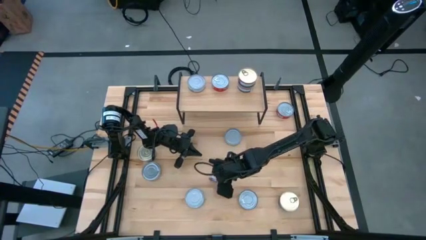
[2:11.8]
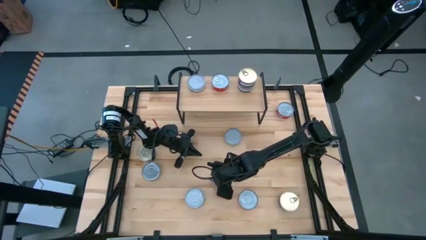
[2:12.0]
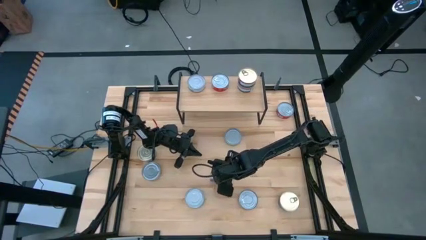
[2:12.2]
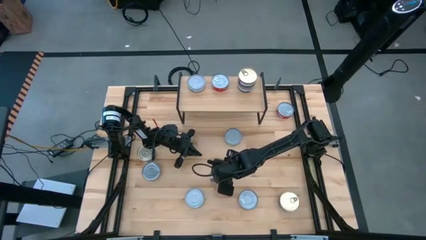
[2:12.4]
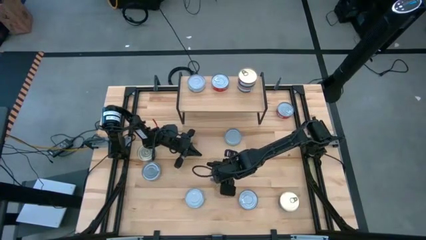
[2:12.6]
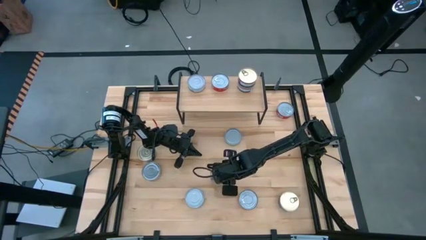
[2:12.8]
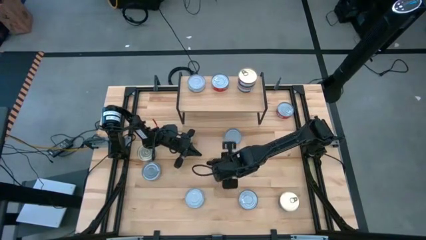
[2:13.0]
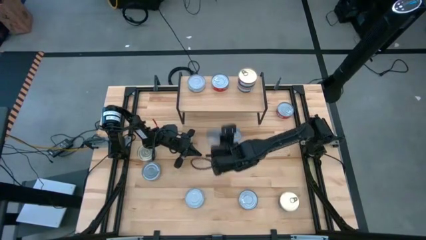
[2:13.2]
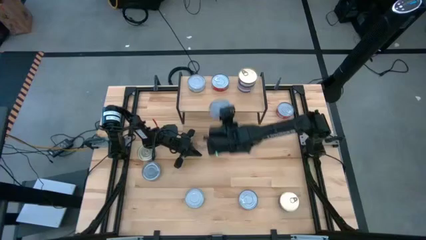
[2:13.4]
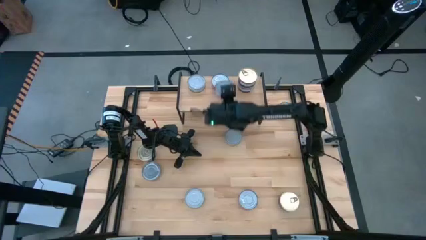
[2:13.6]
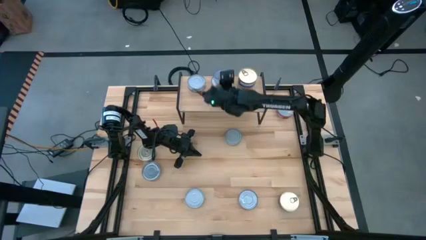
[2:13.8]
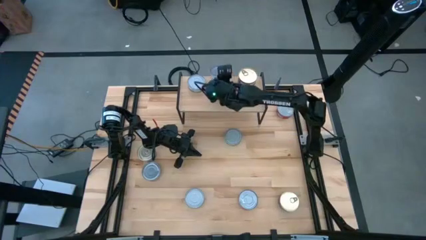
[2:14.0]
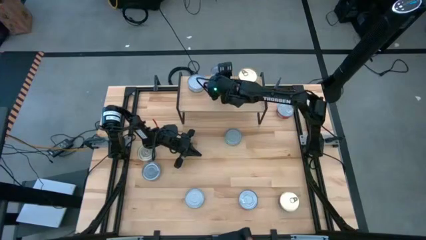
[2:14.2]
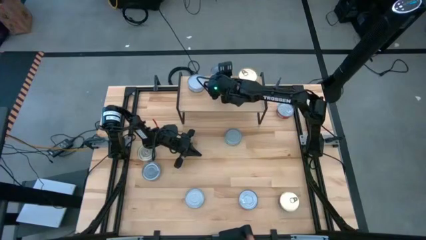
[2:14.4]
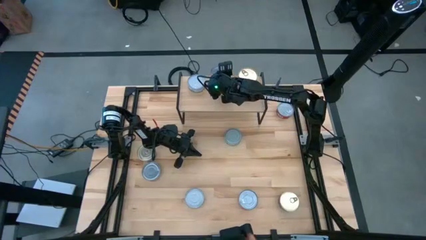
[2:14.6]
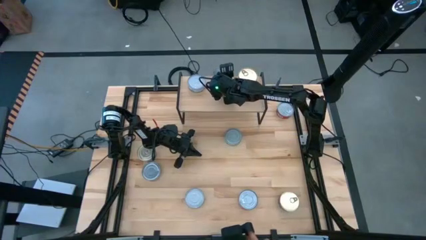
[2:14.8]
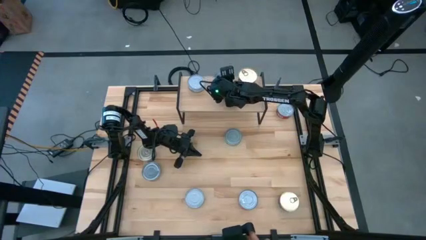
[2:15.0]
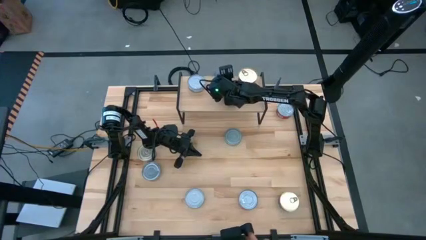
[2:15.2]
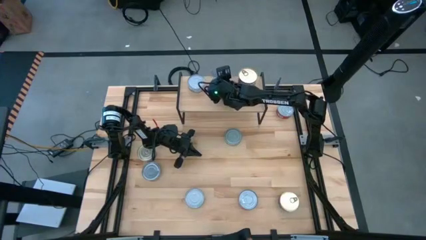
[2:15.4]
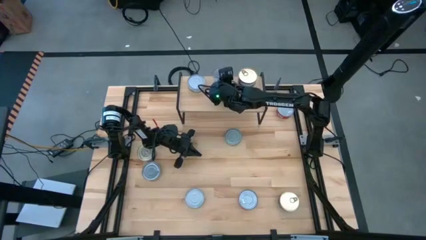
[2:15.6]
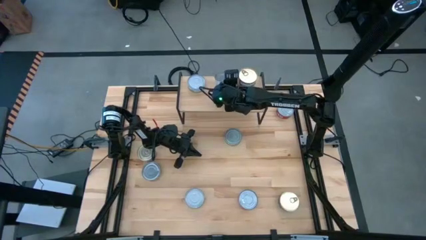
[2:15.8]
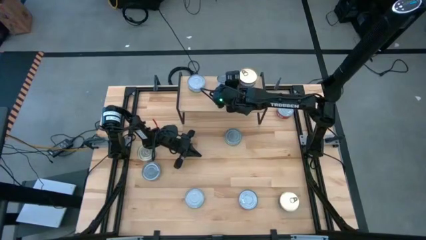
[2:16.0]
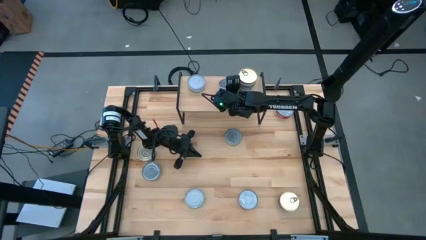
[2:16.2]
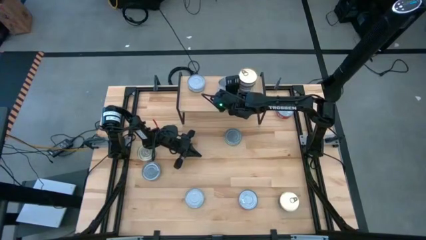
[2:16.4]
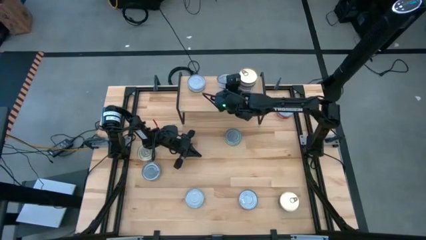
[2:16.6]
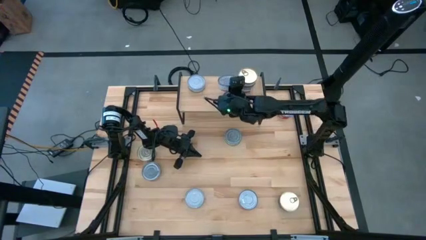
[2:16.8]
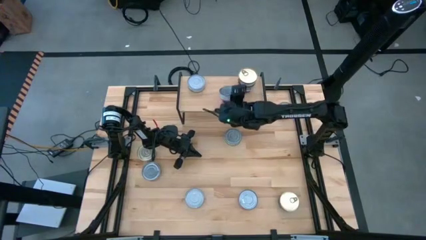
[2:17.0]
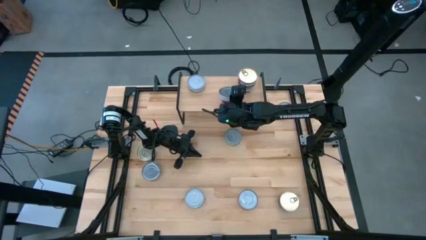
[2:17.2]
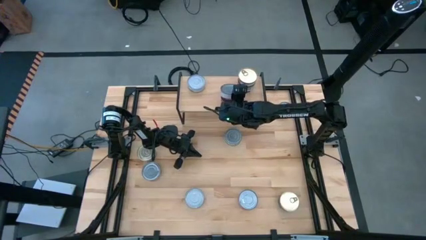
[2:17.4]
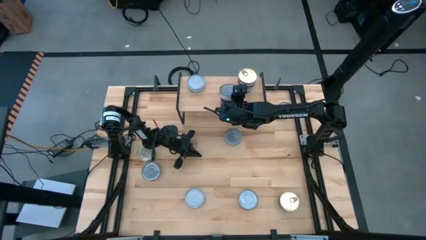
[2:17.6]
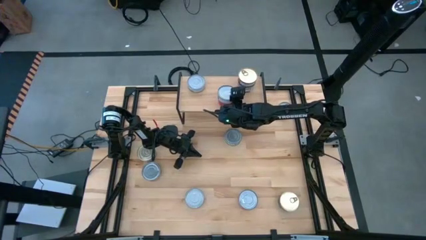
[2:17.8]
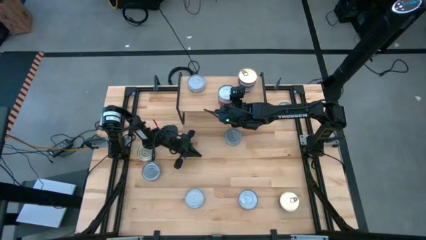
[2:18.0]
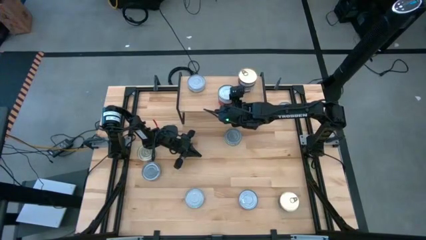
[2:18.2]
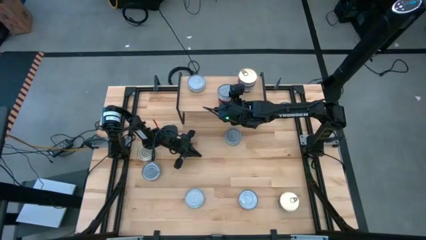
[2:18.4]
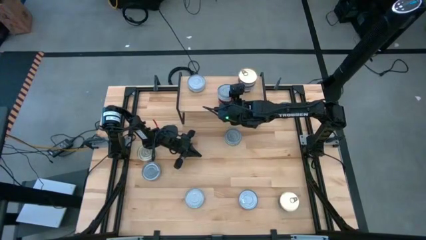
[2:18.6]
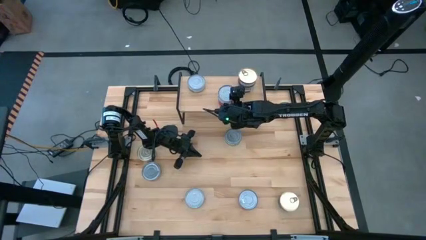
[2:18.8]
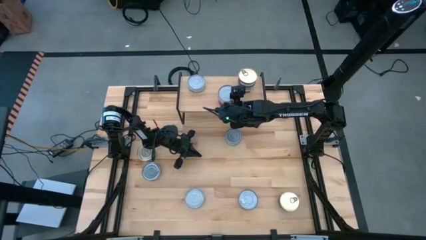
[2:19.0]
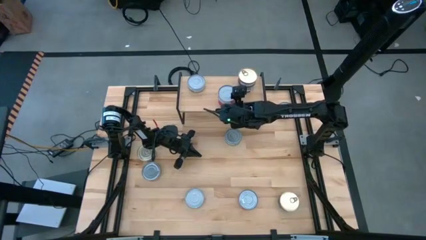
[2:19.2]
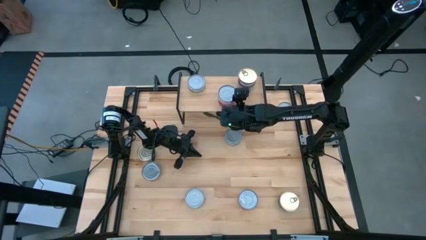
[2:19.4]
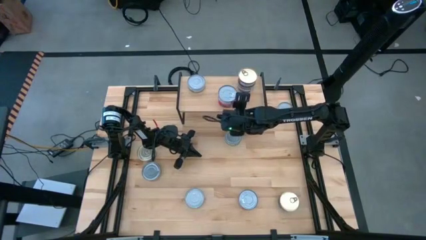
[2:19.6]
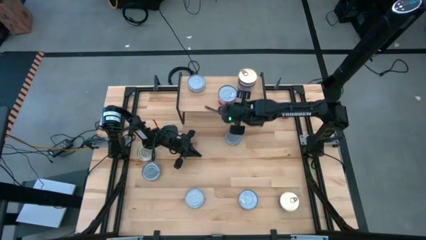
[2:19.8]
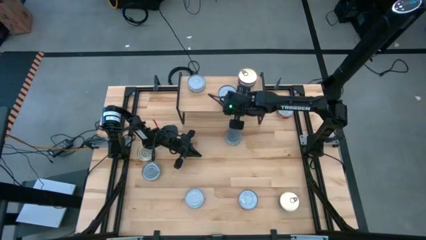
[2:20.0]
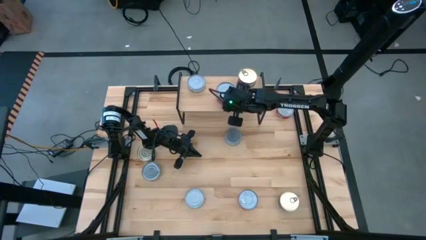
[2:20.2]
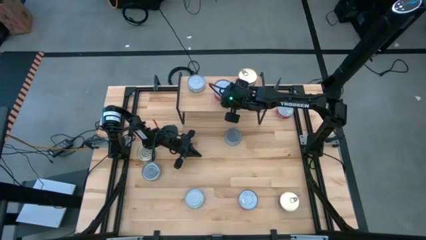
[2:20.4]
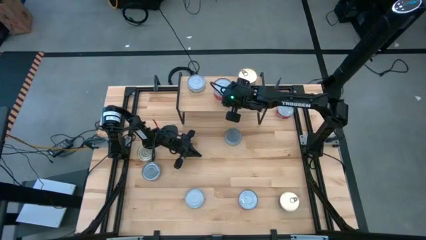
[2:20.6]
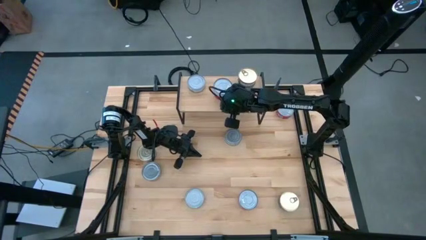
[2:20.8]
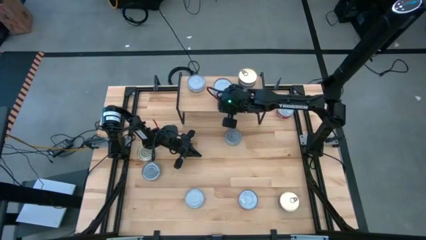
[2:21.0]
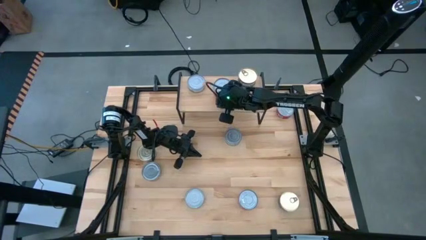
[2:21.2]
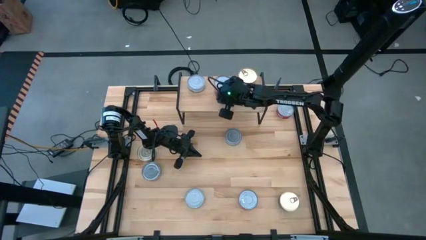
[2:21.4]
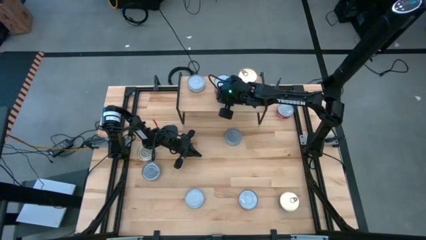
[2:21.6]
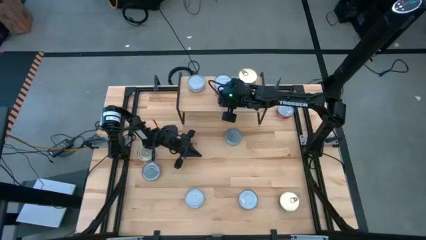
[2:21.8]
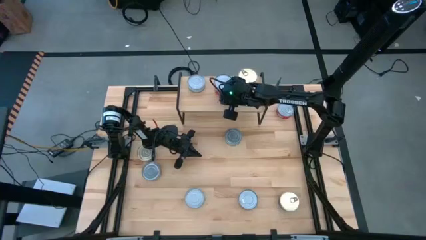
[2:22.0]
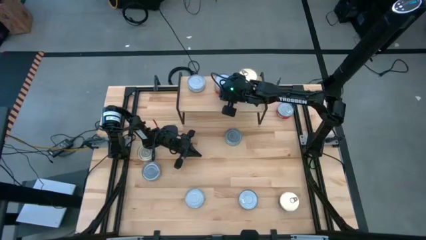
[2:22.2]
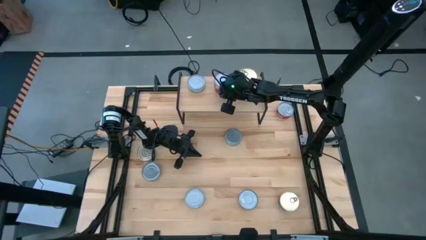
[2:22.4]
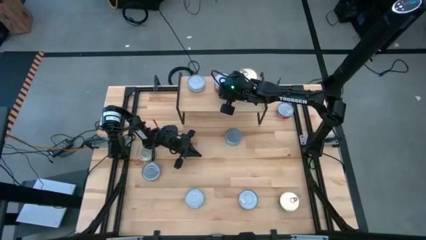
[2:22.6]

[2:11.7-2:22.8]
Task: Stack canned seafood by type on shelf
Stack the blue and pink tuna can on top of the blue and pink tuna can on the shelf

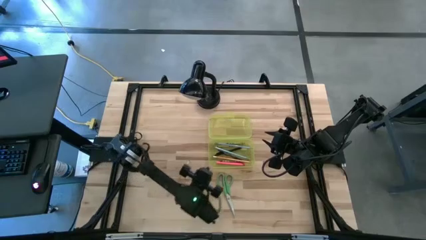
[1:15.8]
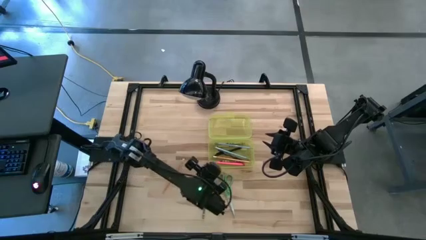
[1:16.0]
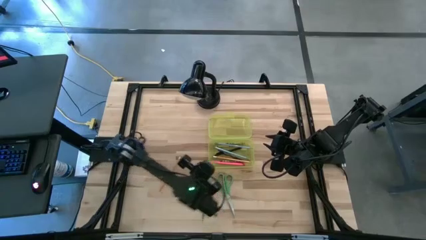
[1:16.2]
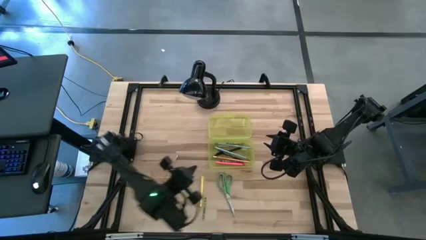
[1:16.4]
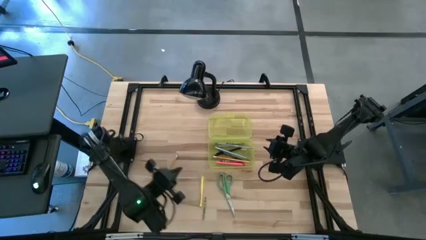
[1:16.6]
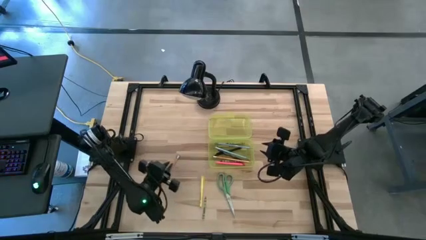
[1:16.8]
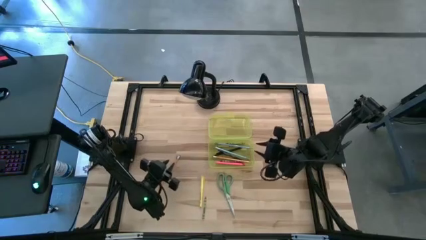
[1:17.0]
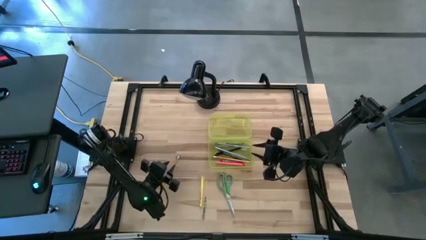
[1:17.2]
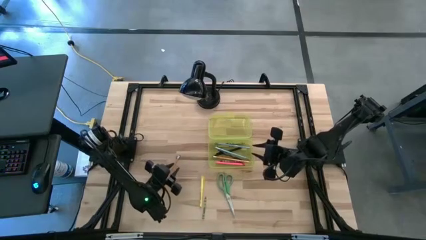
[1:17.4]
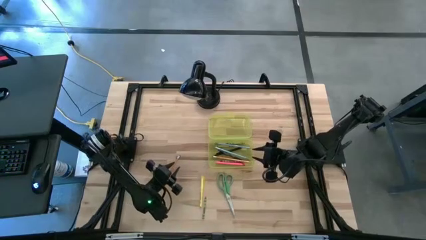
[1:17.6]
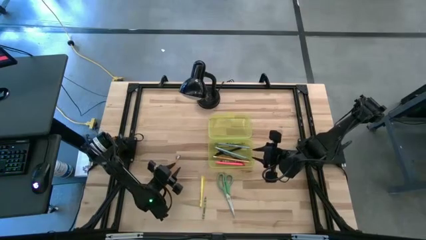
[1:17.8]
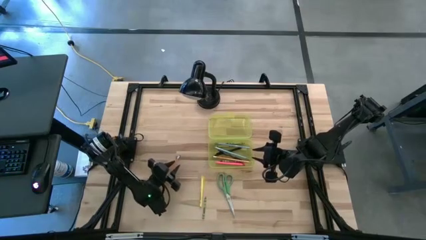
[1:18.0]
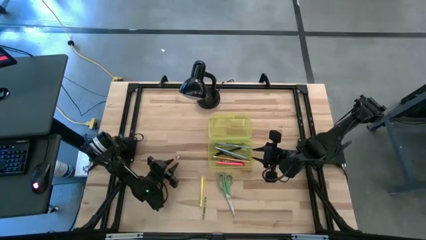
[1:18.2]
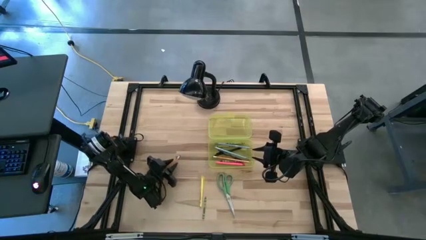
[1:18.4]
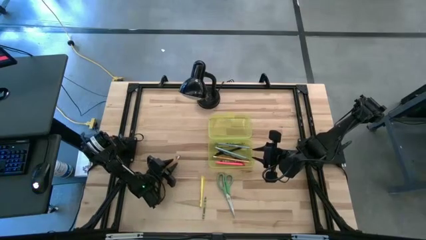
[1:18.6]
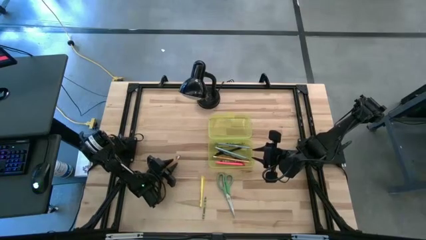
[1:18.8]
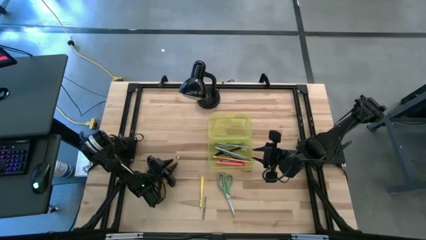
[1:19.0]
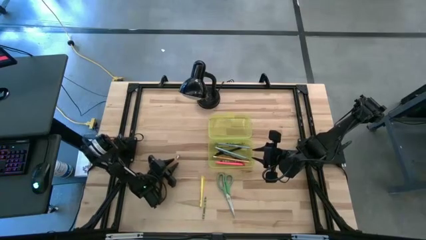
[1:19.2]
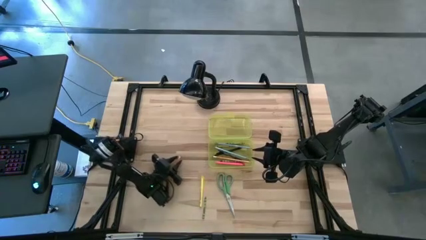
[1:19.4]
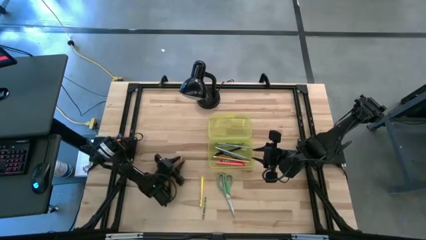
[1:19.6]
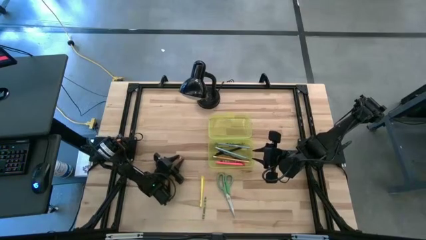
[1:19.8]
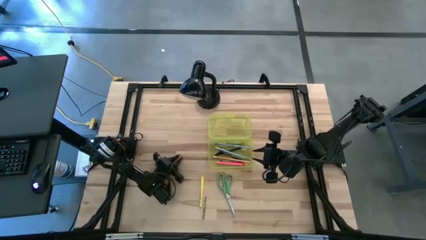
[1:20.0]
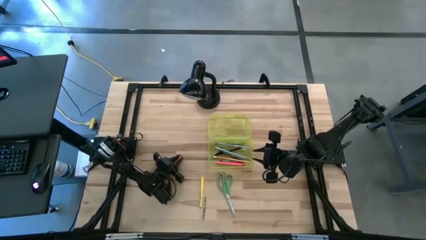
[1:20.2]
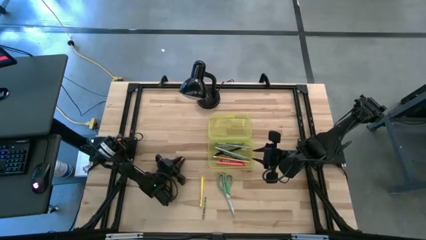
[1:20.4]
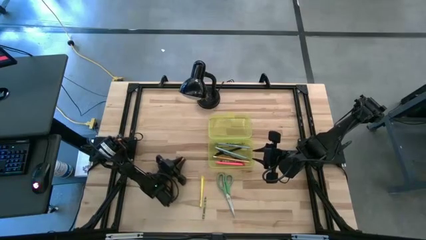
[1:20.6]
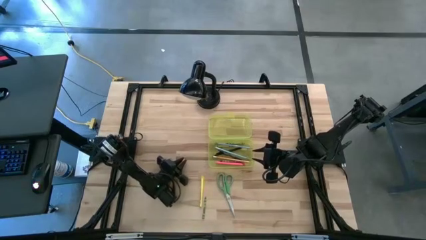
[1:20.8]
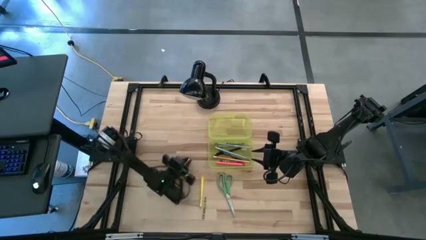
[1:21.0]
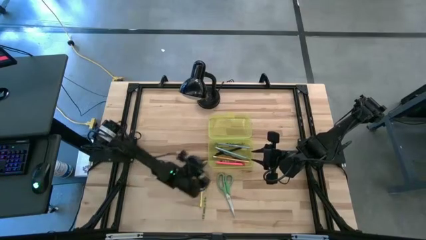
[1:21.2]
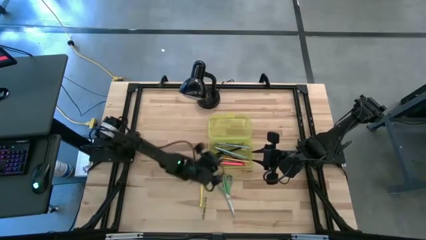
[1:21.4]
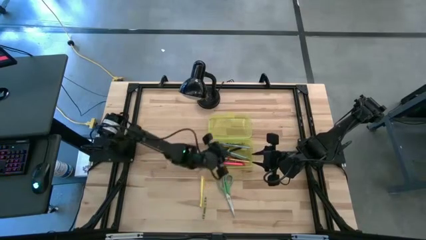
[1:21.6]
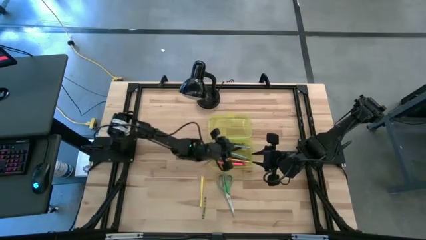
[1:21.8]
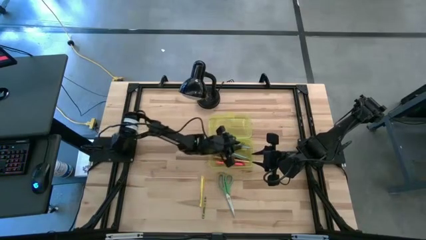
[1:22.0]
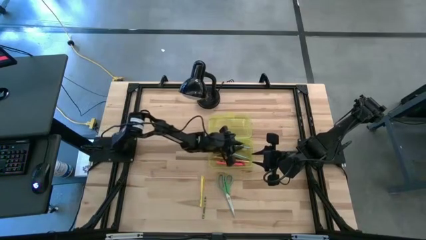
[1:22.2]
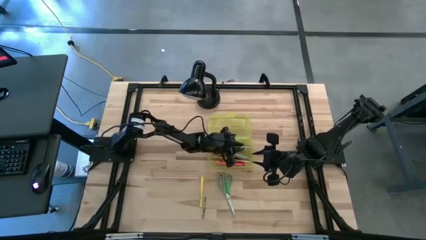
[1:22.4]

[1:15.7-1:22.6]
Task: Pick & place school supplies into a supply box
Put the yellow pencil into the yellow supply box
